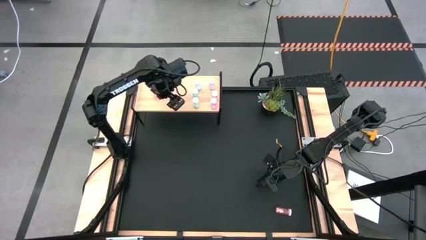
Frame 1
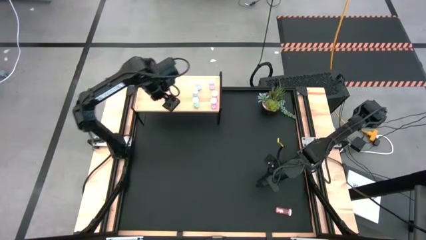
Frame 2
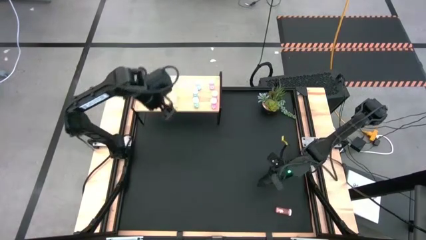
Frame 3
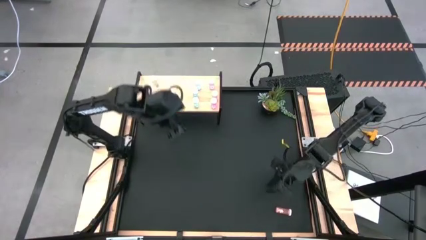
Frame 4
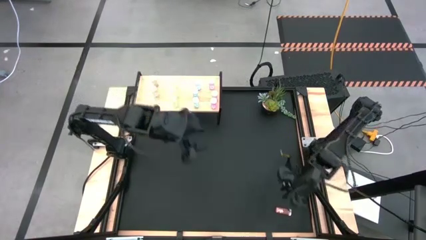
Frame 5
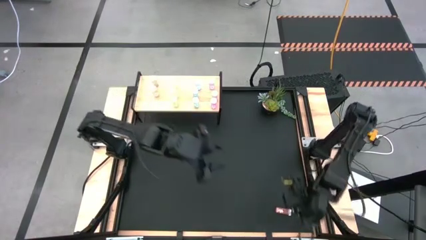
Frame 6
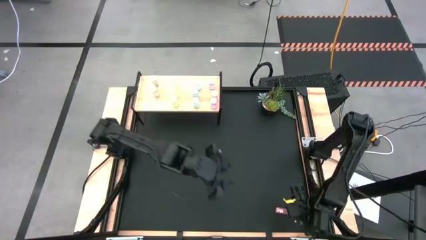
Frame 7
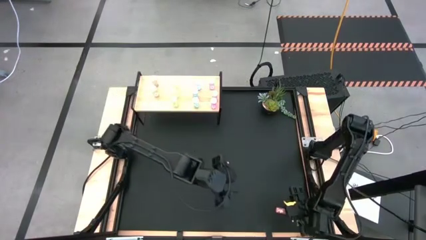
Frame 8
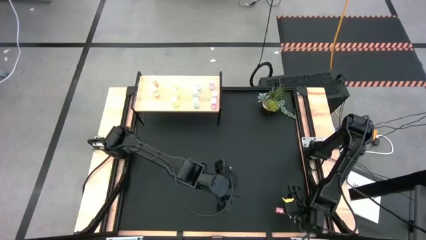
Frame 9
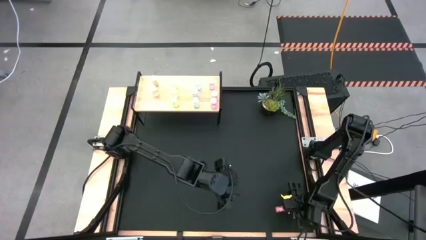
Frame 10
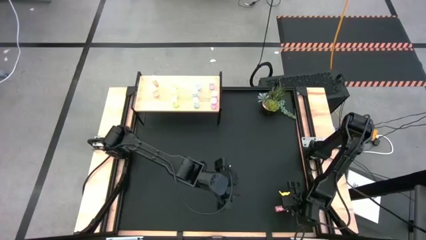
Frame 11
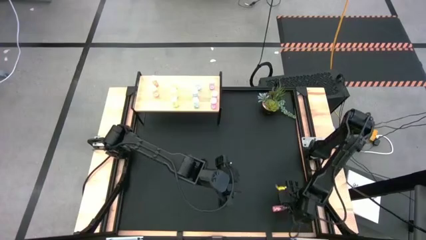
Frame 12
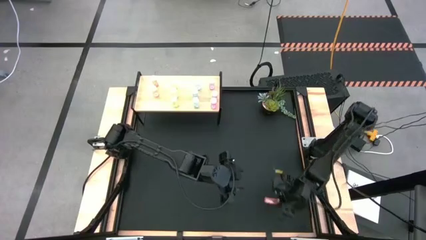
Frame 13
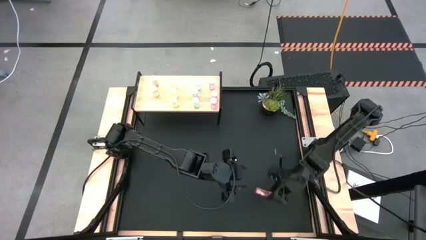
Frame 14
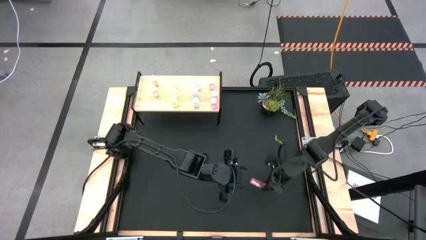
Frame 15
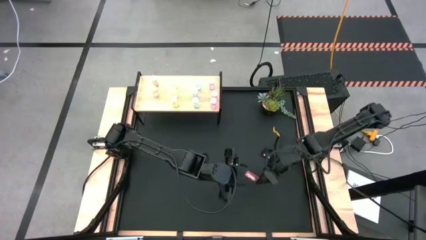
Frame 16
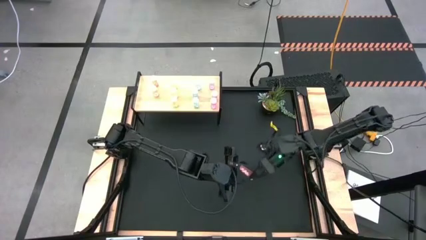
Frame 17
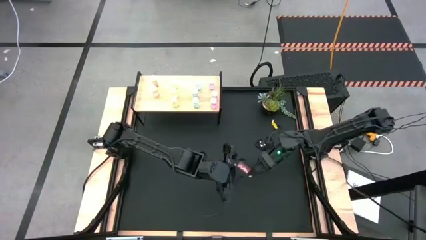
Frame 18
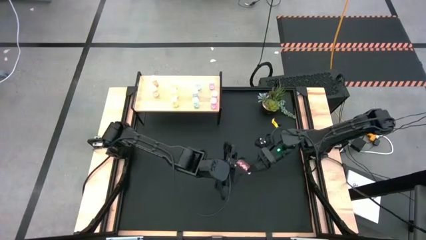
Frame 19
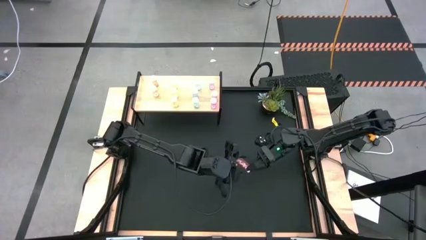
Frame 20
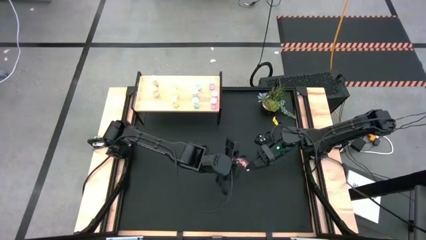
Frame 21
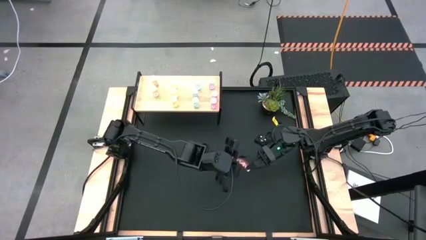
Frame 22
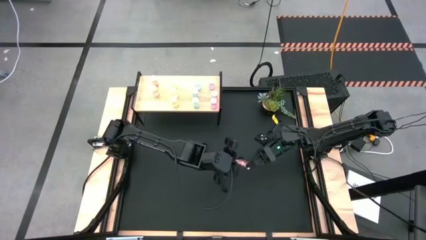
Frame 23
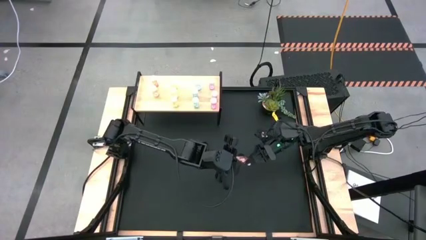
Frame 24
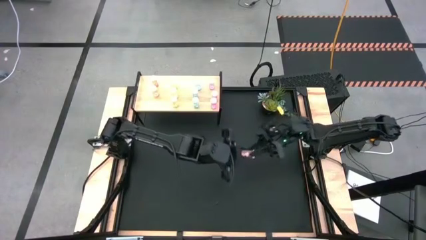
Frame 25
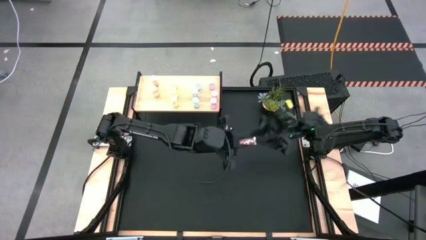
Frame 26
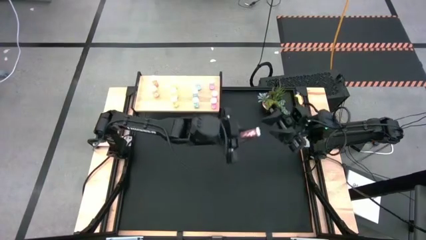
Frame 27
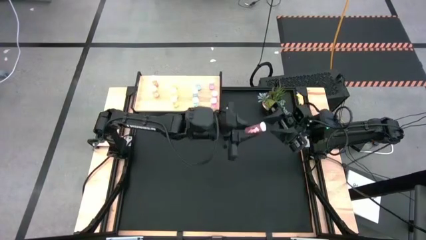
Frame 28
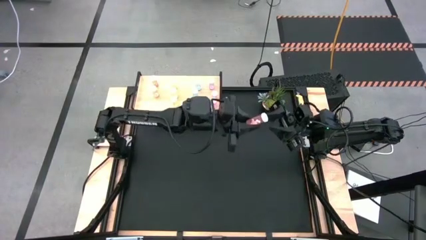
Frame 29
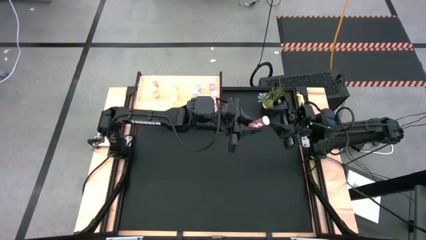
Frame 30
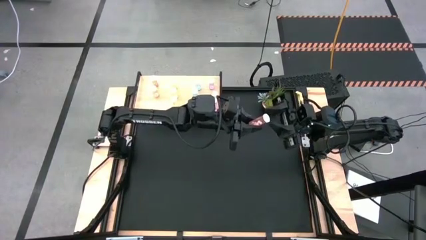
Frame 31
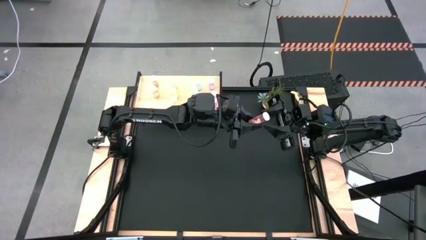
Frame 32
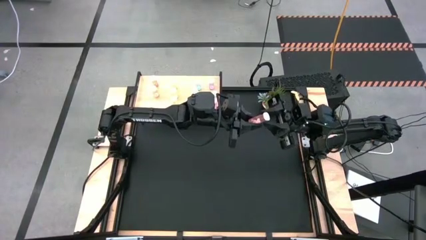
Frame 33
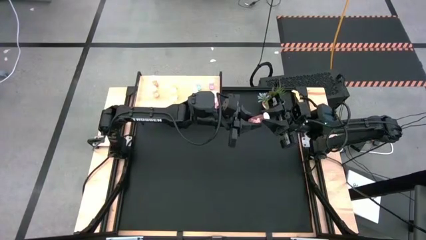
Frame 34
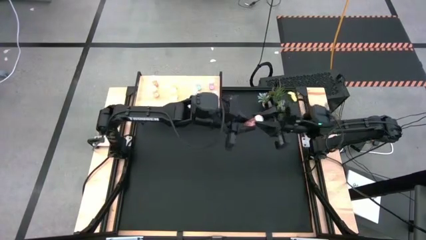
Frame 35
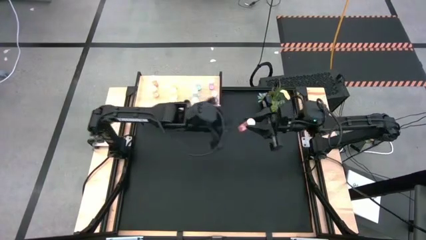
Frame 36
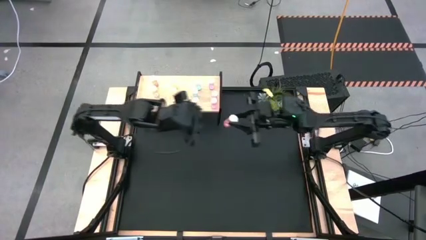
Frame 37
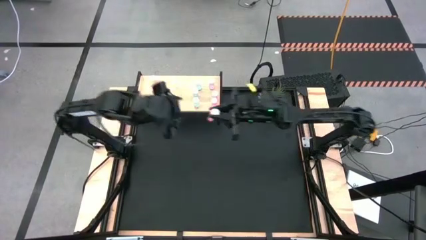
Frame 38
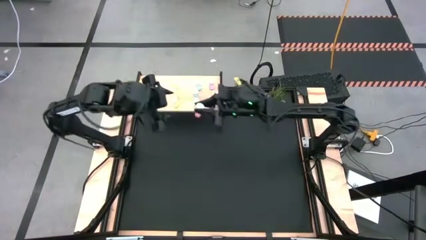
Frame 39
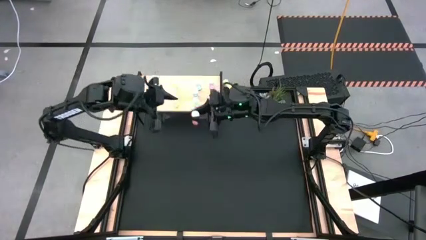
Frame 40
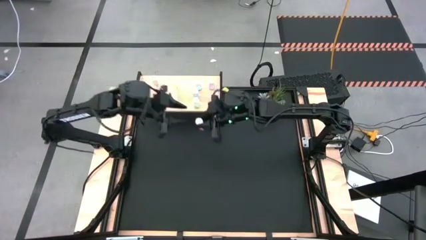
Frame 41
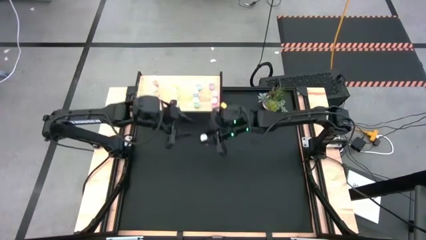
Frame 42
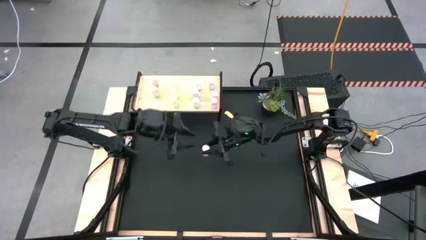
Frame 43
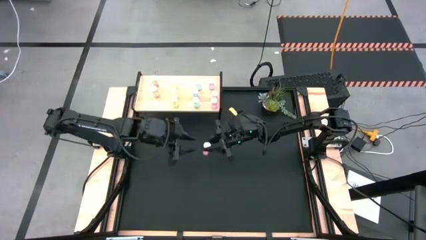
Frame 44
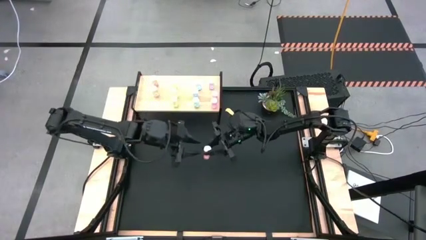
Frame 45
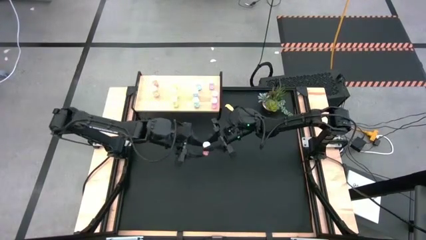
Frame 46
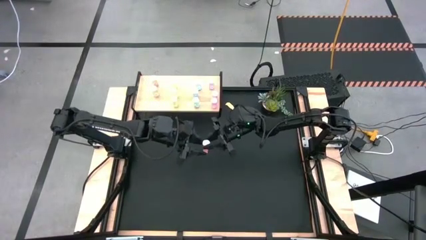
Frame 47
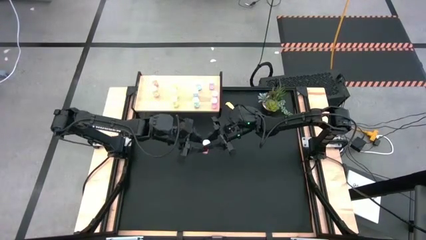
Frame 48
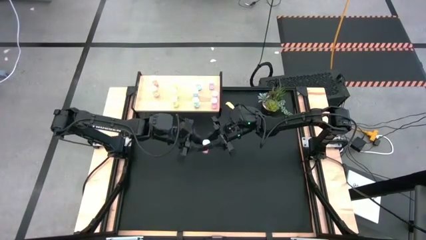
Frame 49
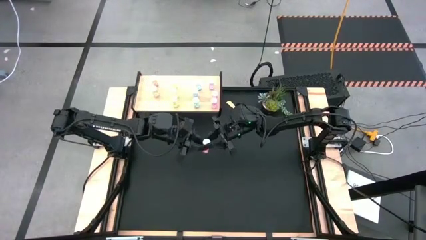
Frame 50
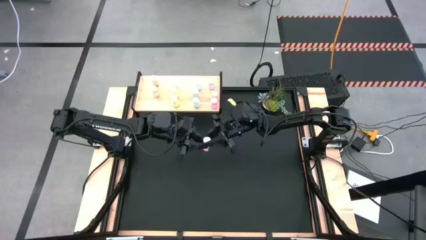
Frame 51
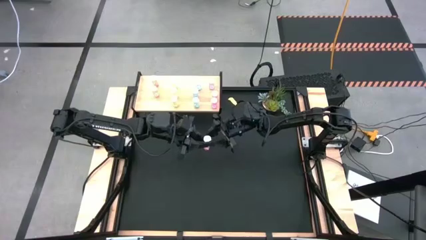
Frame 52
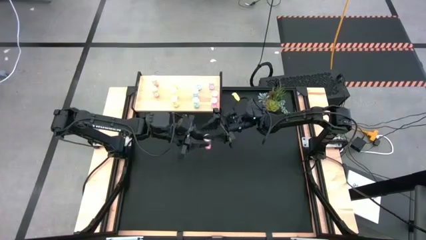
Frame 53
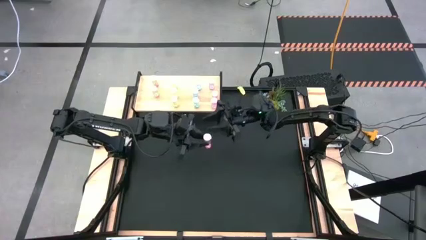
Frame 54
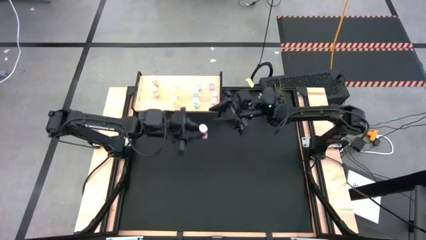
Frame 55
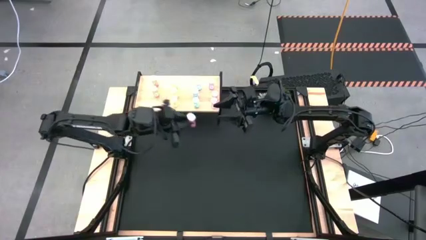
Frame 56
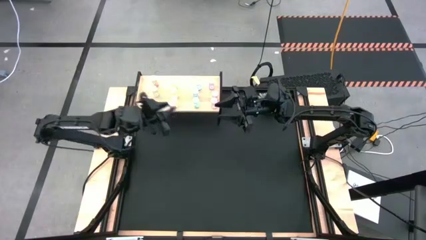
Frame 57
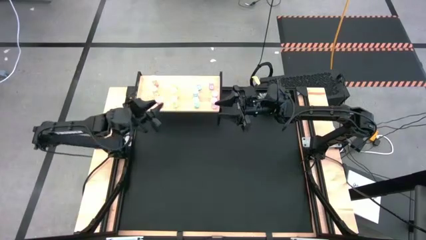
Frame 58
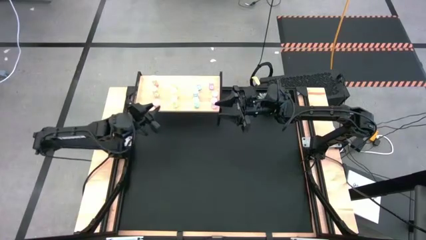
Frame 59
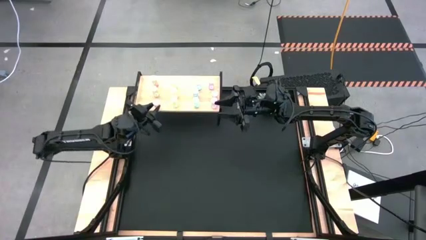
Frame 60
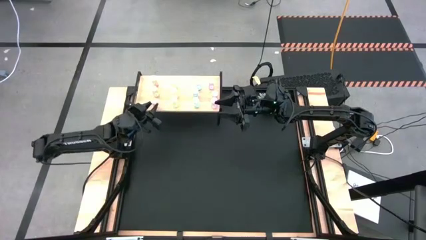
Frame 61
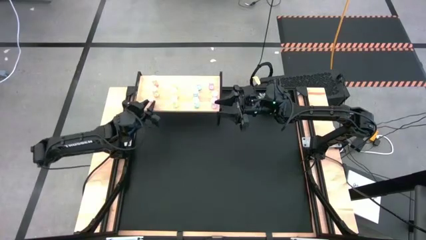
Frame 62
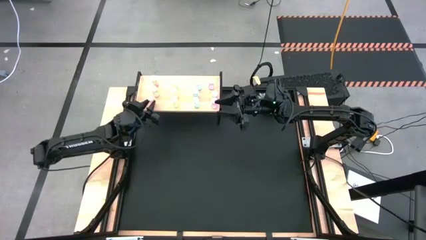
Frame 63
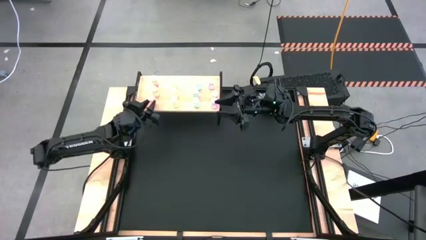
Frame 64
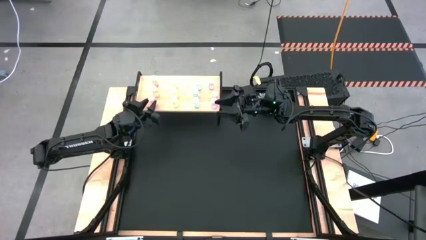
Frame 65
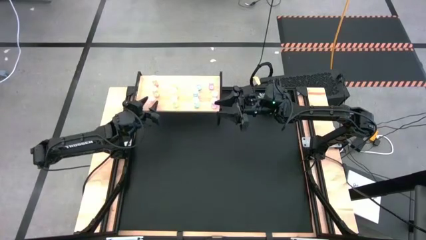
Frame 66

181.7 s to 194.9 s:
Task: Pick and place medicine bottles onto shelf by color
Put the orange pill bottle on the shelf aligned with the other orange pill bottles

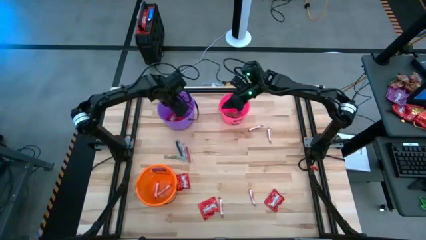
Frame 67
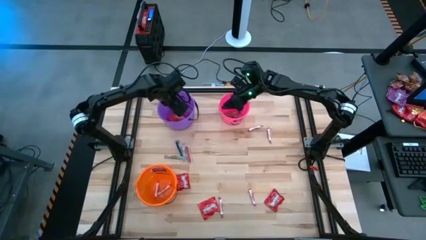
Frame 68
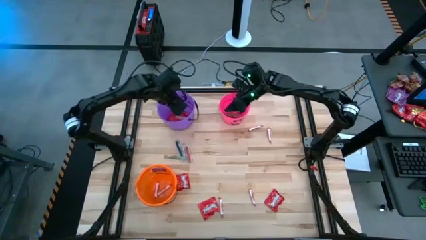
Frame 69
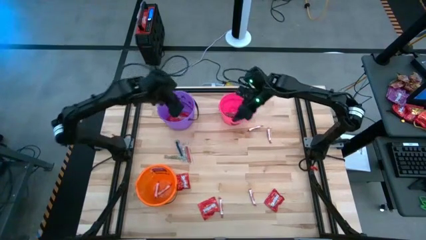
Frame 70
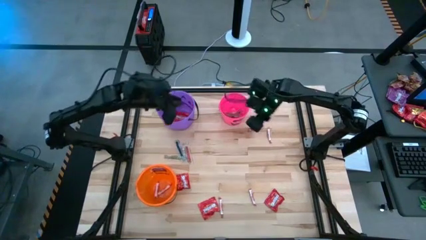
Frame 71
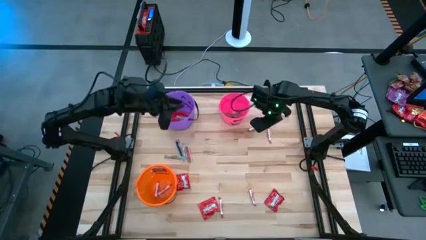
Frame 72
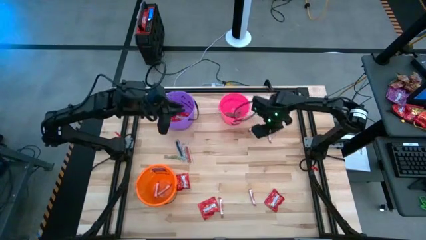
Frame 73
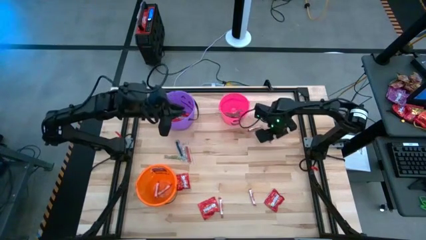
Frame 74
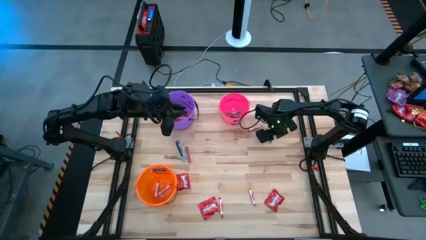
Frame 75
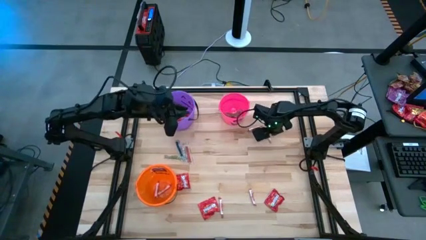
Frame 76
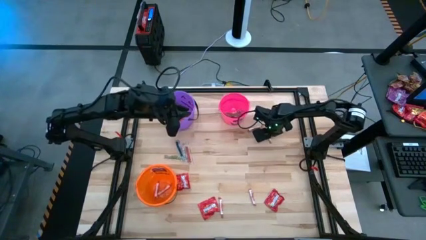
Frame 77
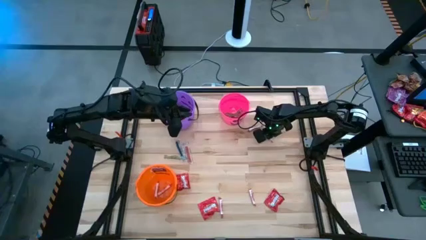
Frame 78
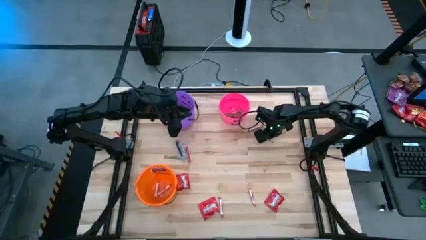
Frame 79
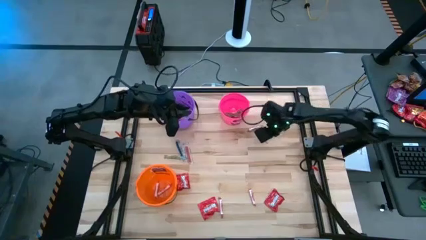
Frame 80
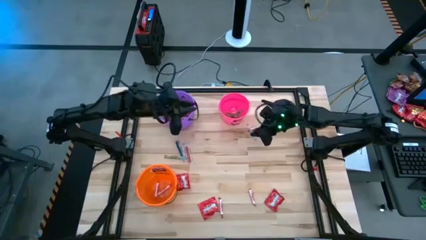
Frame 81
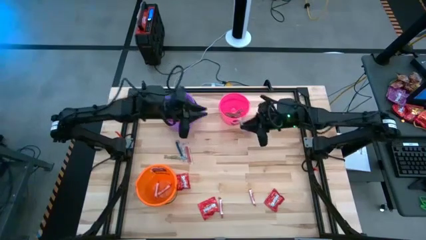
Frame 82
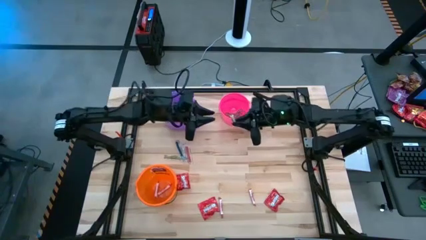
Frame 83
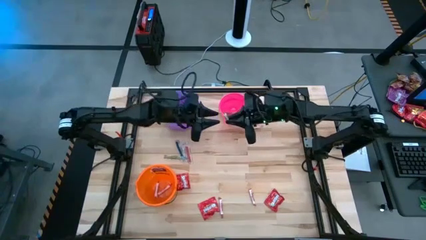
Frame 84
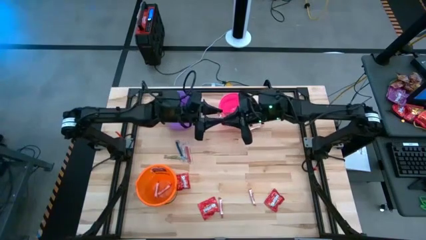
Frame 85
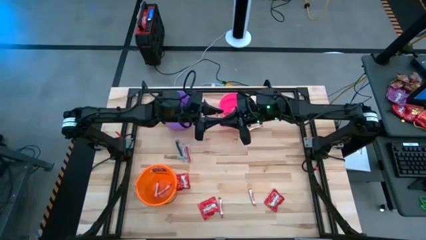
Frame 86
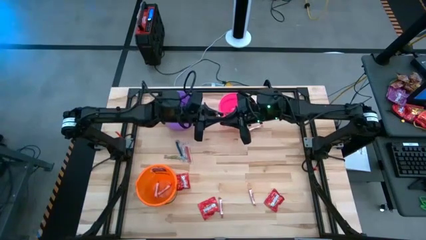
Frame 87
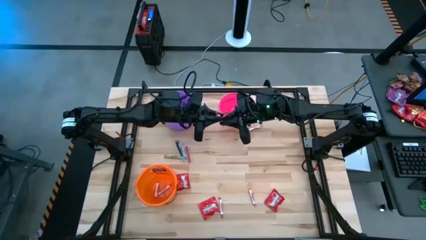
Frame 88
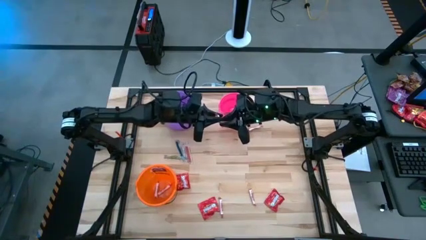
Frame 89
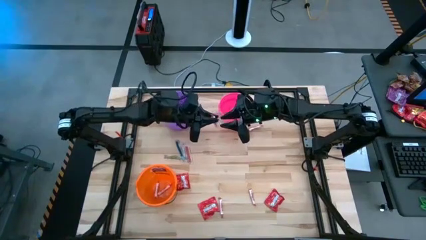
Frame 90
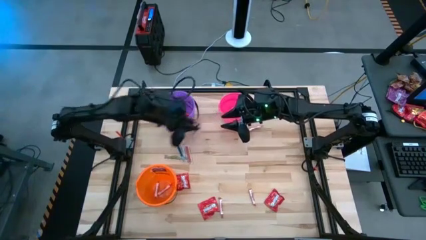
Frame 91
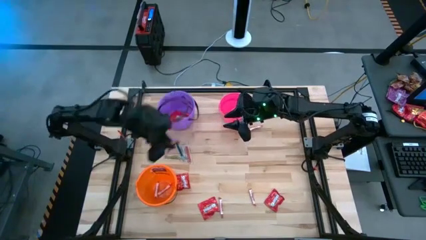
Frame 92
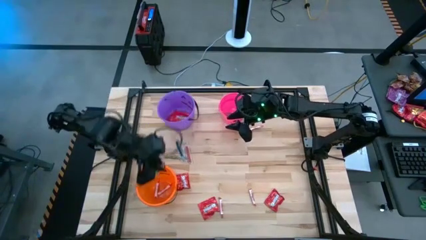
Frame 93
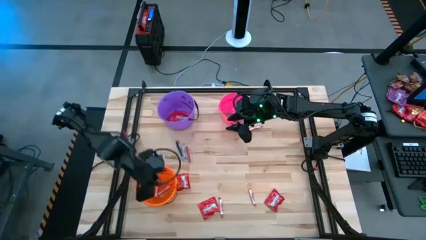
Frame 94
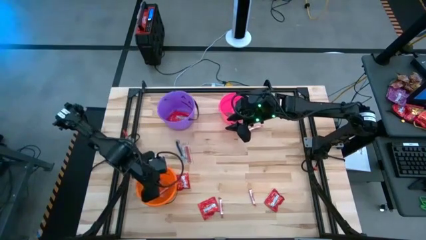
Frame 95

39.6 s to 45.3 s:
Task: Sort candy by brand, put in halloween buckets
Put the white candy into the orange bucket
